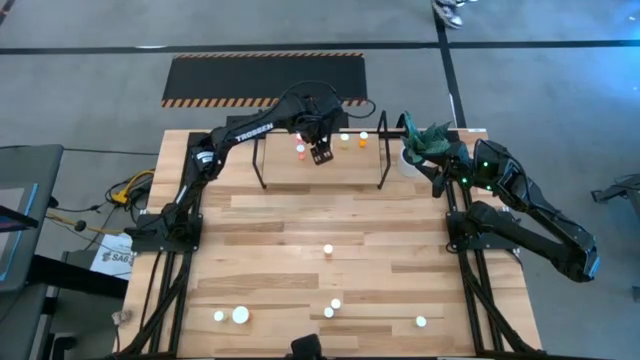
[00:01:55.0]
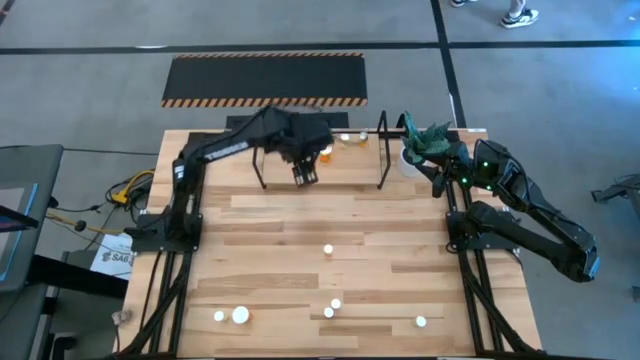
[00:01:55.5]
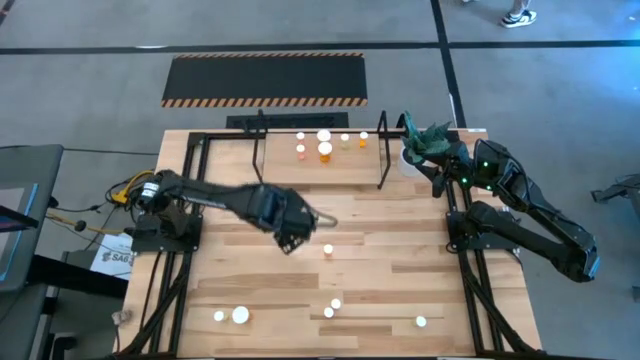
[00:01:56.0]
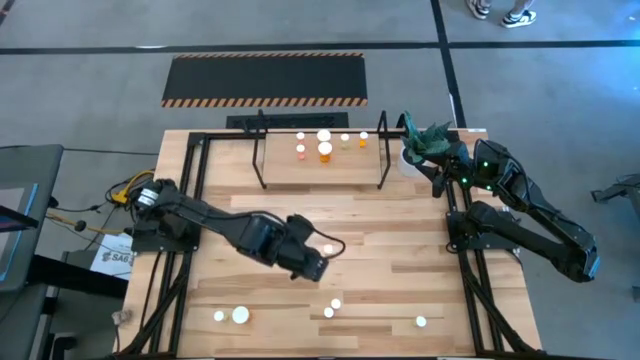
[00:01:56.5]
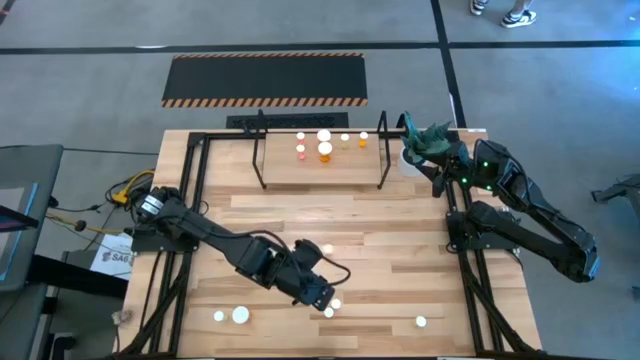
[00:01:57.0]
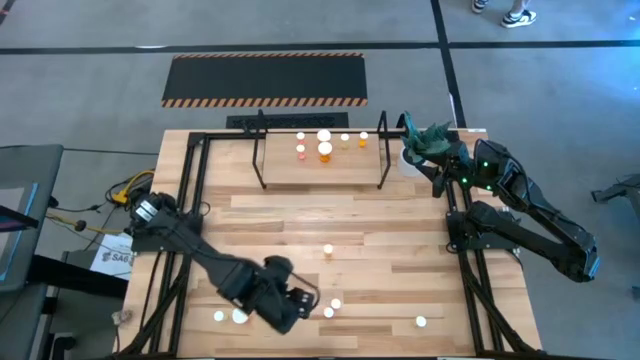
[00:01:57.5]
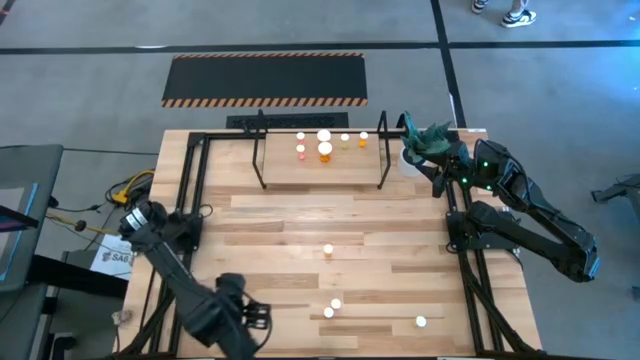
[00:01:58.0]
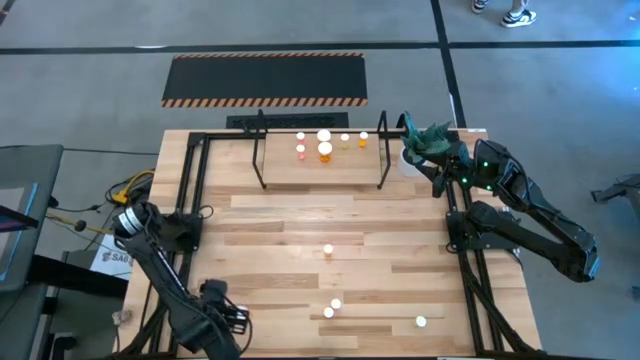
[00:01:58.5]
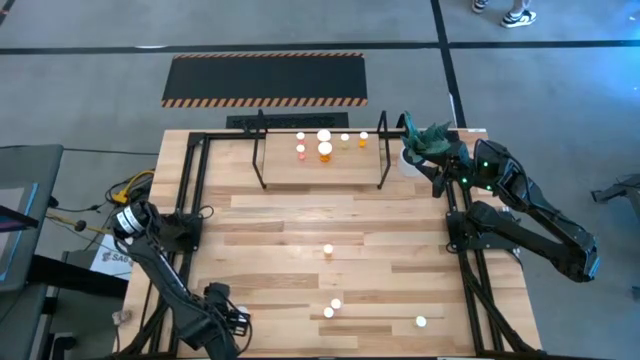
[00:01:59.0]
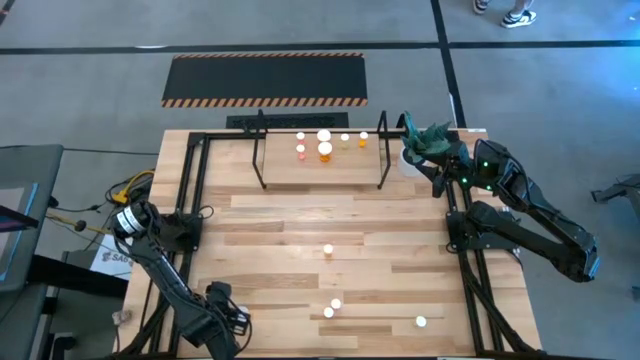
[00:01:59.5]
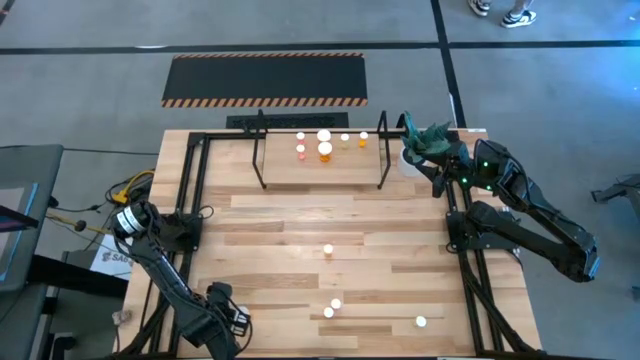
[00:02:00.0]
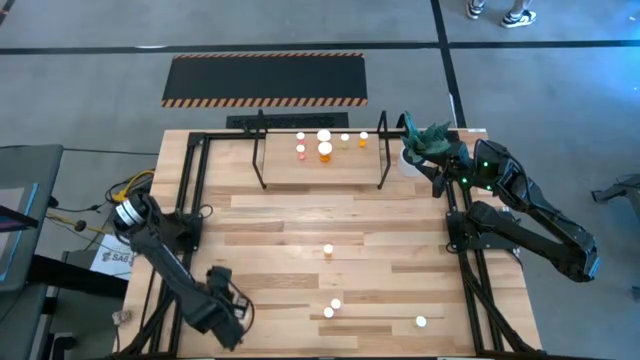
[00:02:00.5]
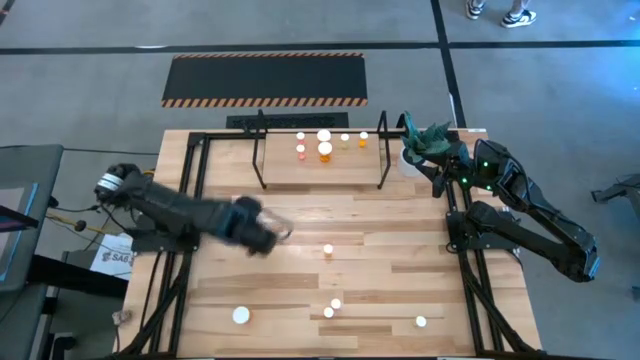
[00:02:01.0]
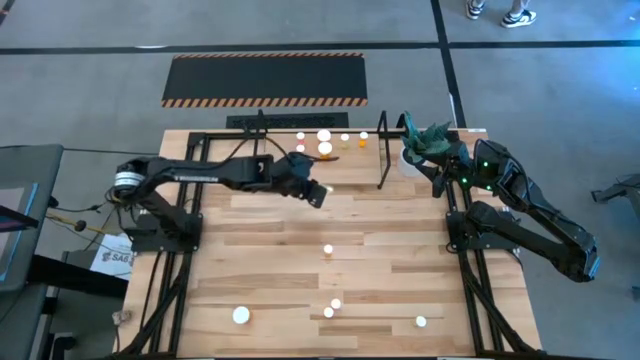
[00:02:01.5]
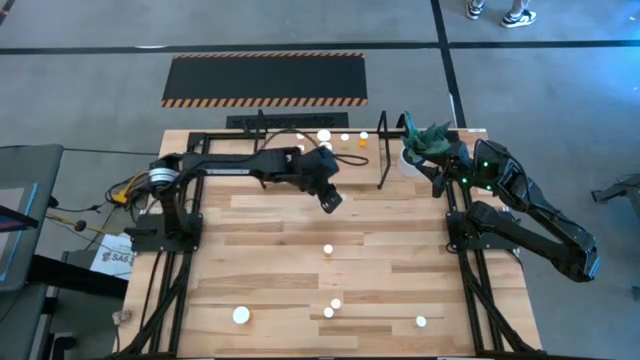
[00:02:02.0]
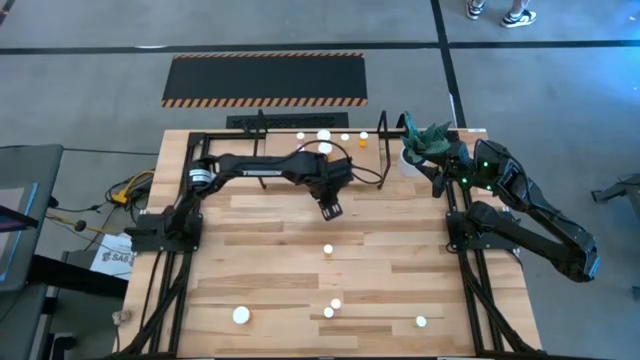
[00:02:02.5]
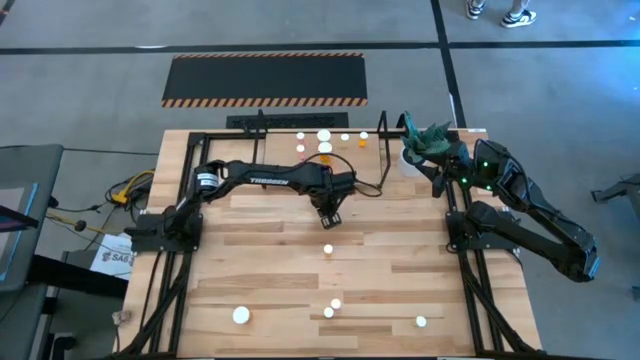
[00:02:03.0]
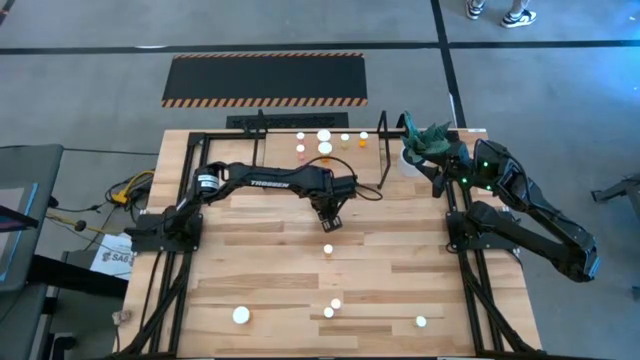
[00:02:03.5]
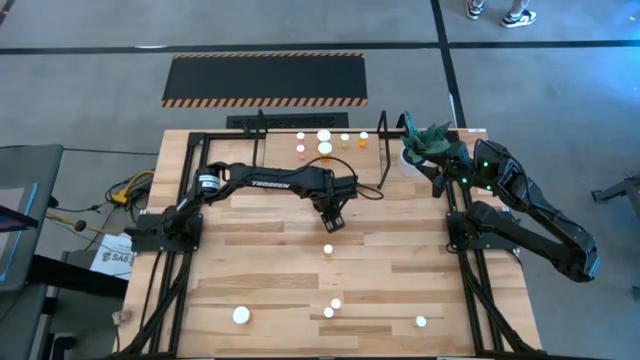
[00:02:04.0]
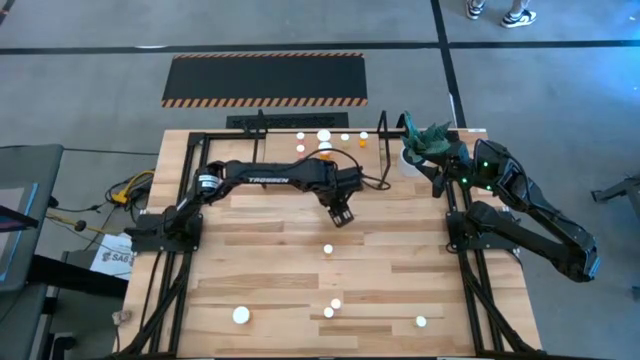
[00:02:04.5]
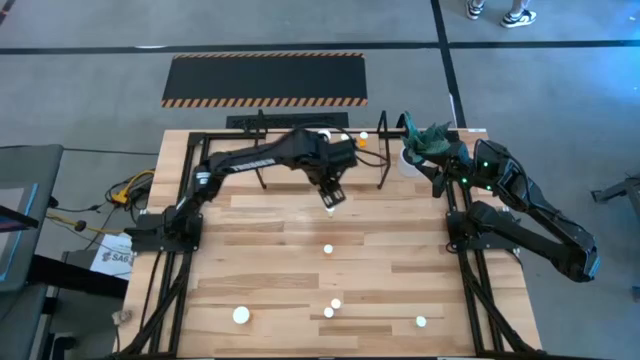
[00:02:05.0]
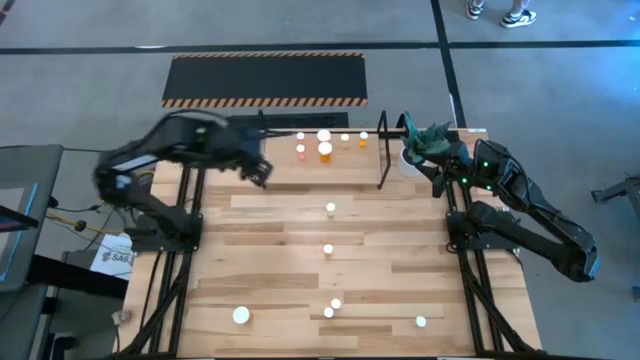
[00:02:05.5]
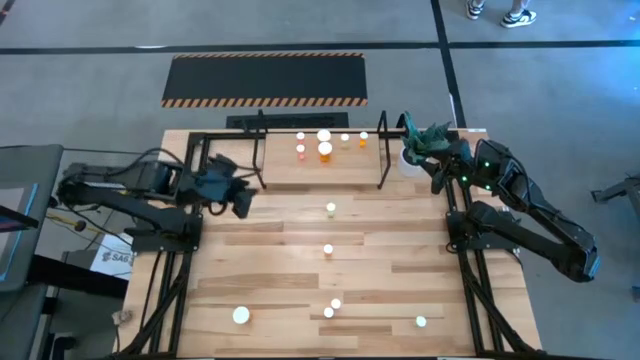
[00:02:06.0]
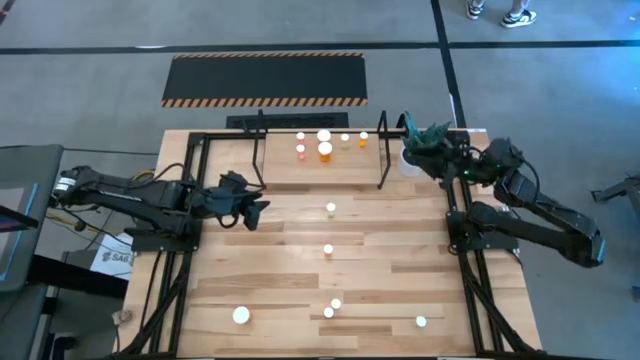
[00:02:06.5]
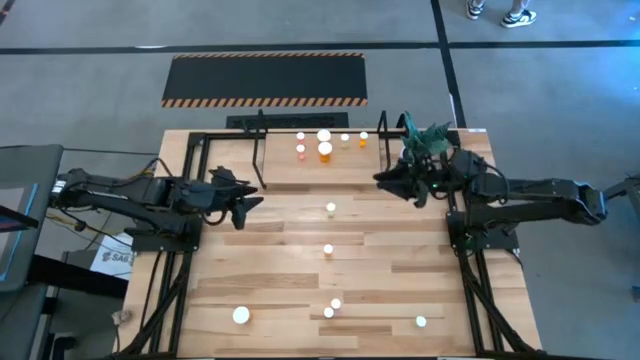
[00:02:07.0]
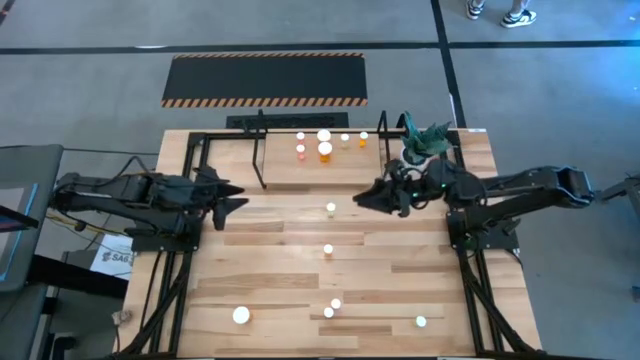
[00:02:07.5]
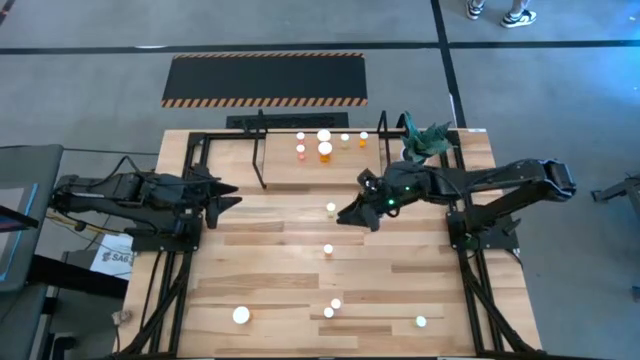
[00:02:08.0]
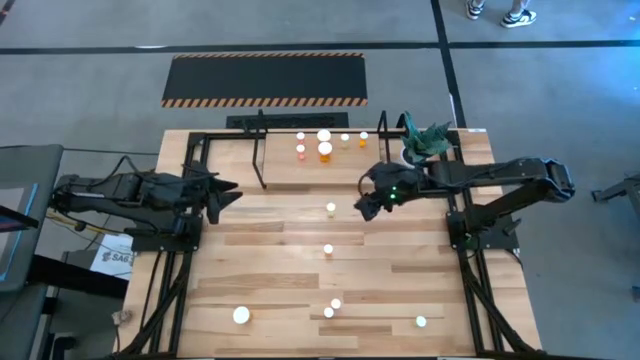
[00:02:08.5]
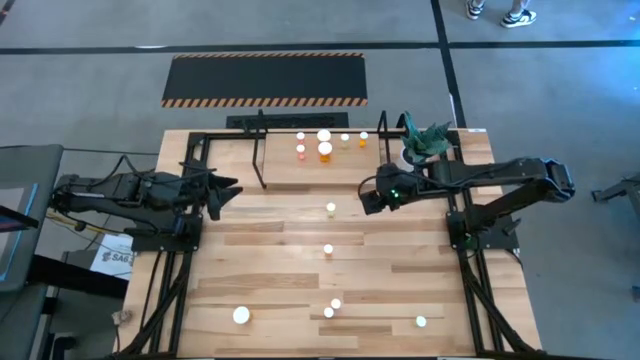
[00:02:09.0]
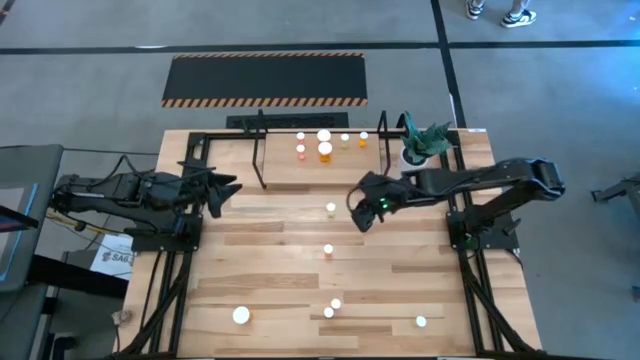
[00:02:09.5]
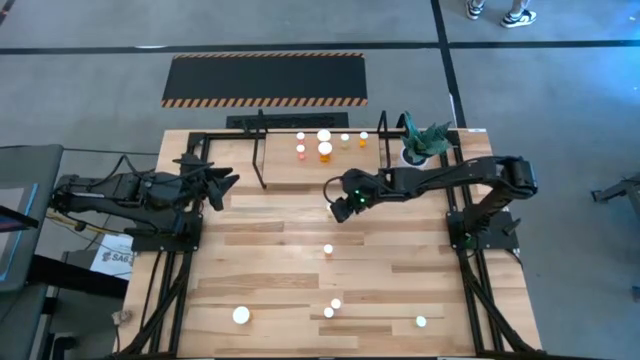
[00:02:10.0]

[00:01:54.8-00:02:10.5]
Task: Pick and place medicine bottles onto shelf by color
Put the left yellow pill bottle on the shelf aligned with the other yellow pill bottle

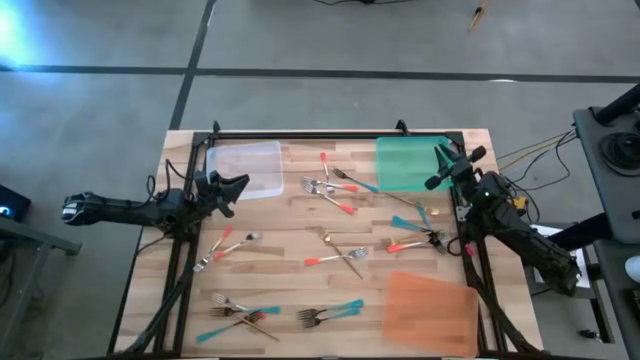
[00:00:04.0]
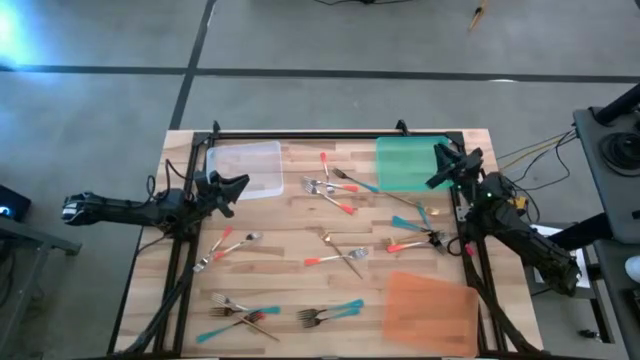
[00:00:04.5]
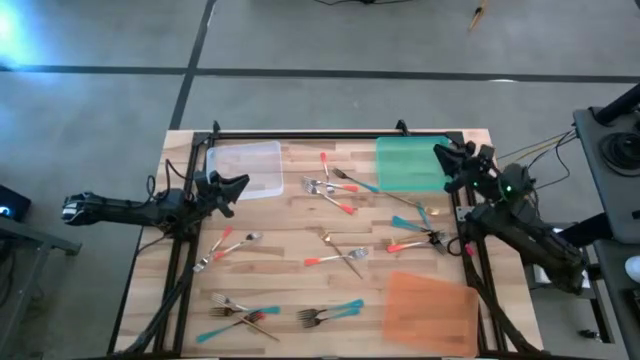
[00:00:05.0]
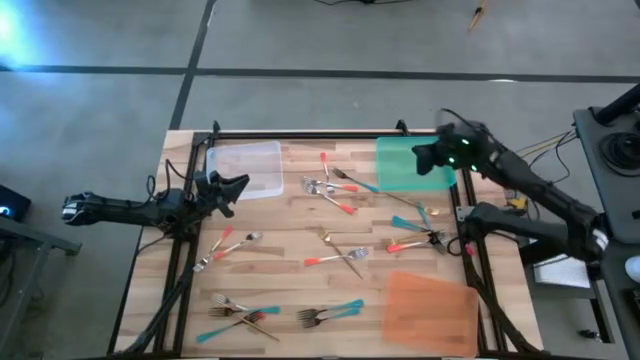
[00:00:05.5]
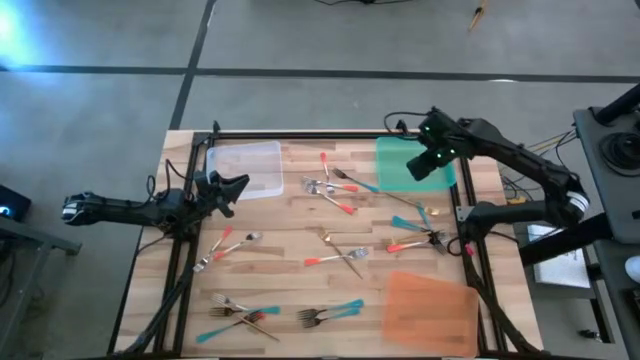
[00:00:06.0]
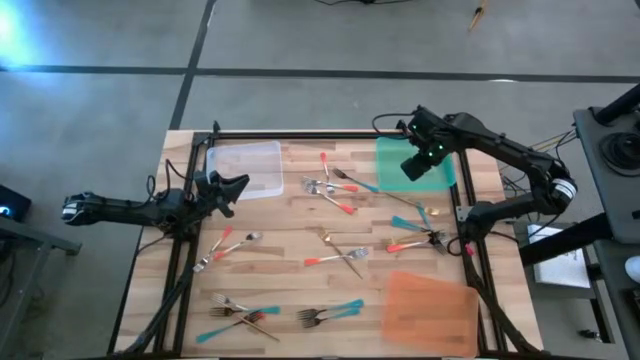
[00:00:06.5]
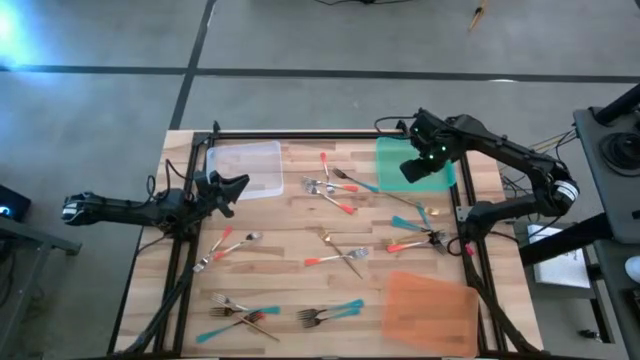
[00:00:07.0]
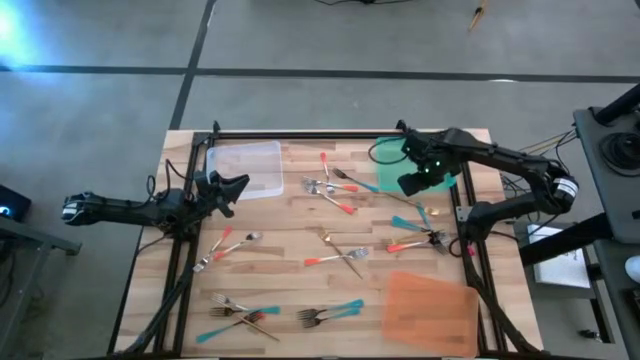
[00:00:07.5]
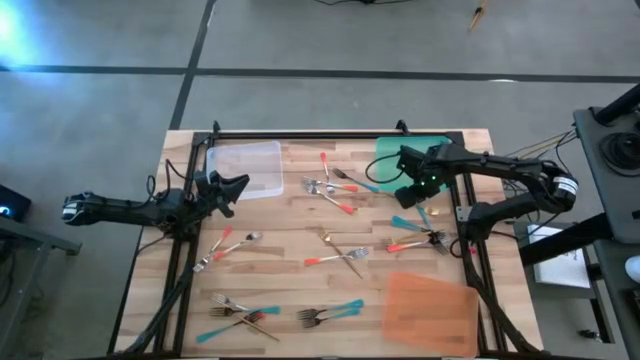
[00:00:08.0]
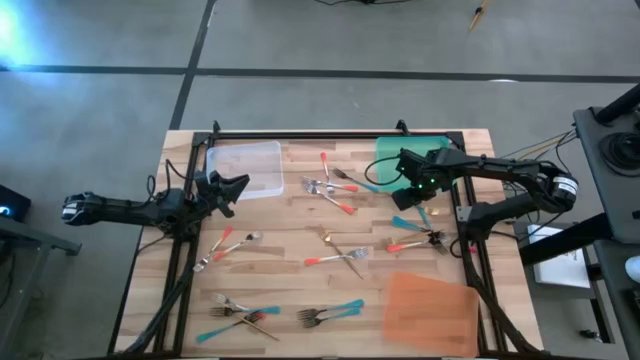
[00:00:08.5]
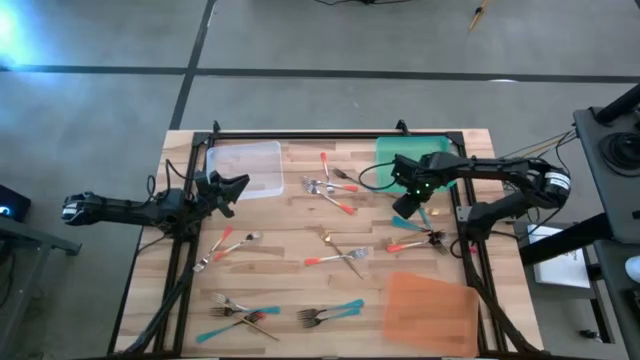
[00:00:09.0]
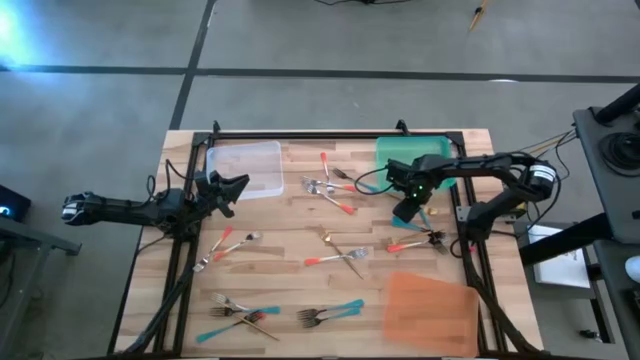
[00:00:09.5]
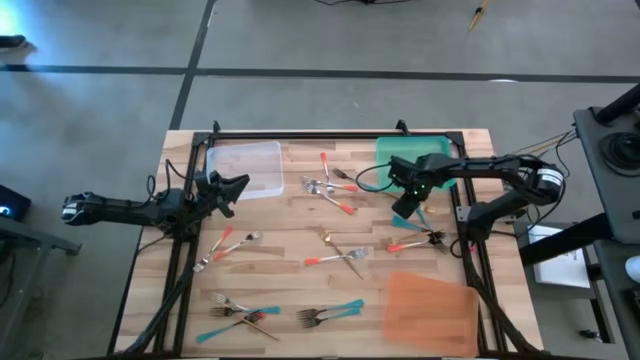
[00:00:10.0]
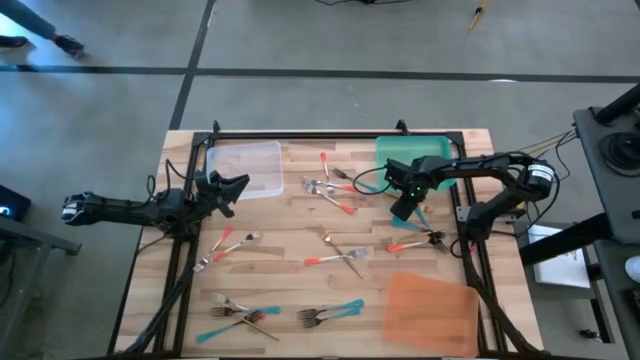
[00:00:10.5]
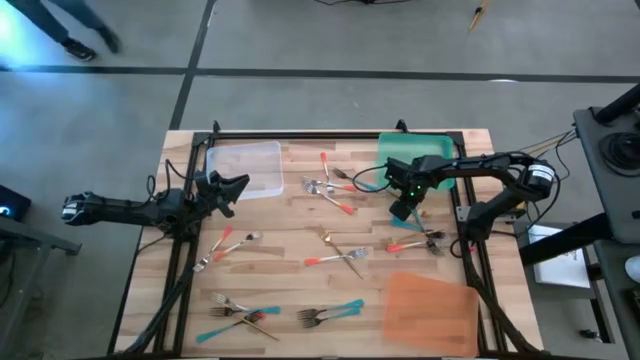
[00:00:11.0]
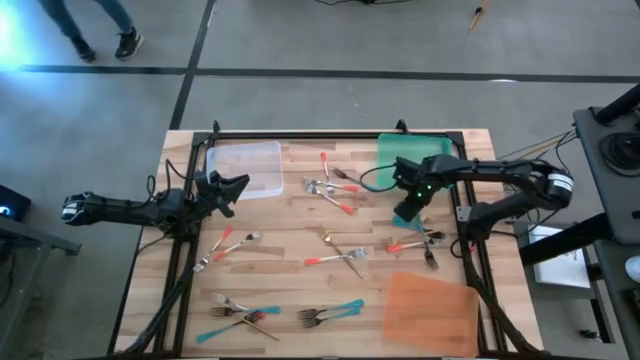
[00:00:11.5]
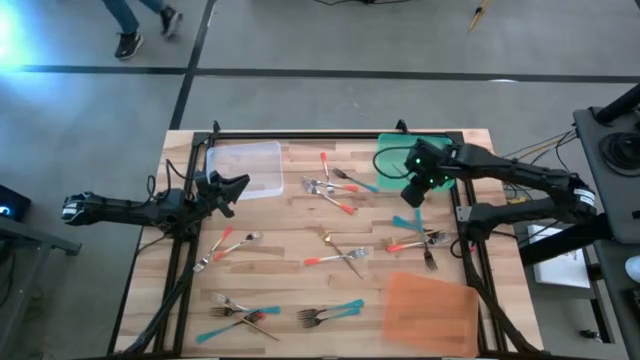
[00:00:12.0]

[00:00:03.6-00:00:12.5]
Task: Sort silverware by color (type)
Put the golden fork into the green bin
